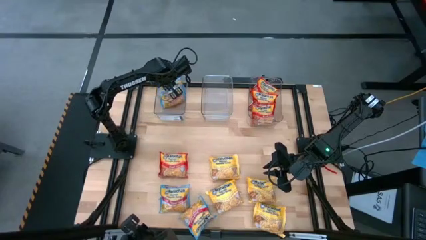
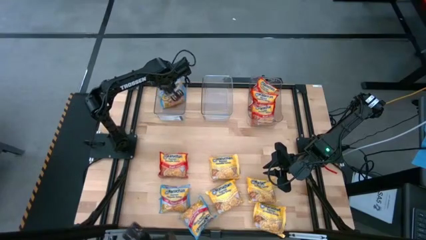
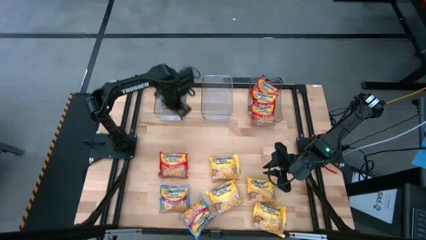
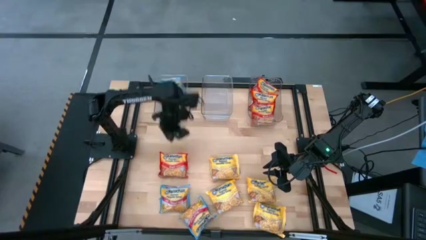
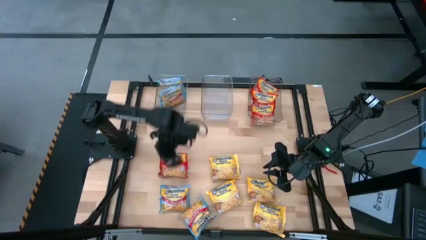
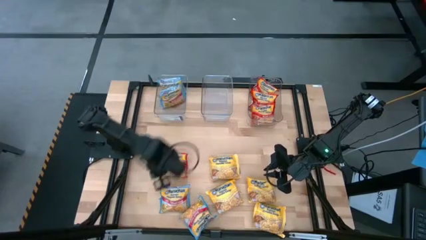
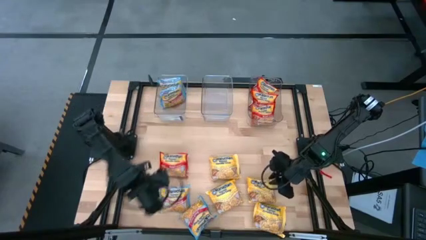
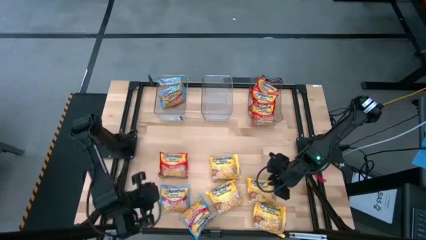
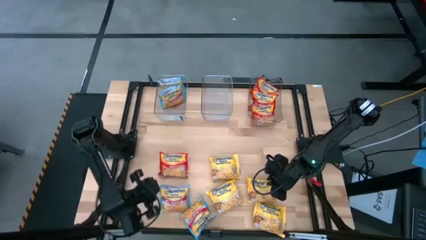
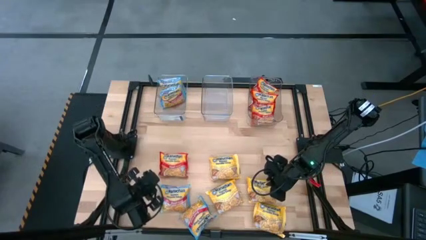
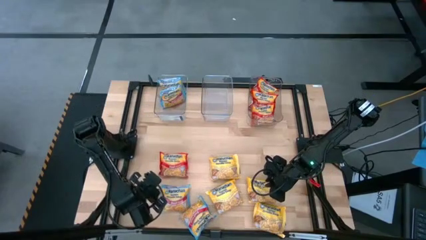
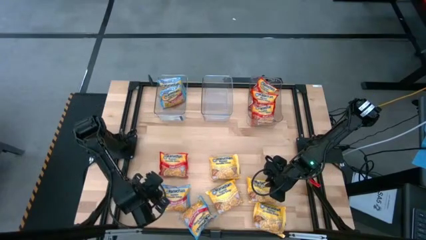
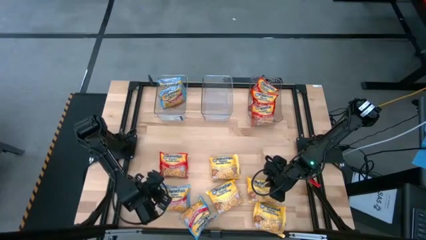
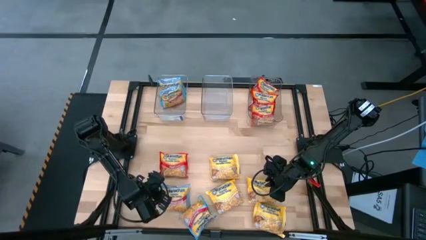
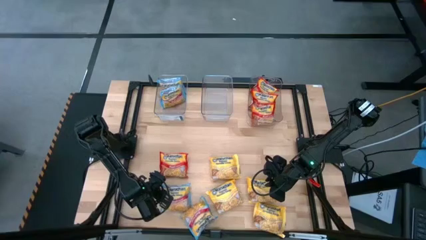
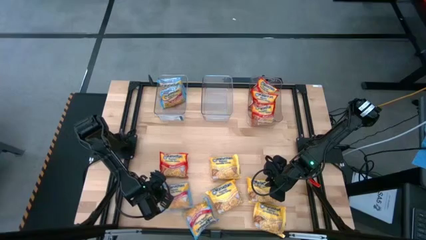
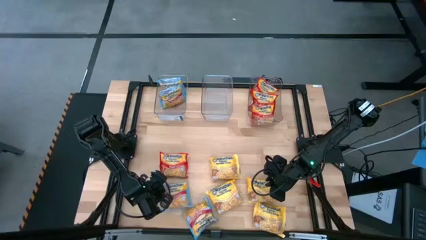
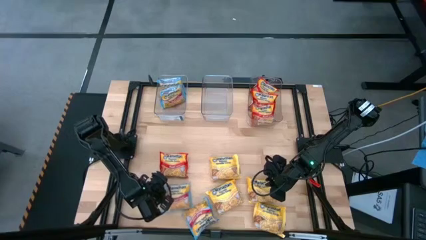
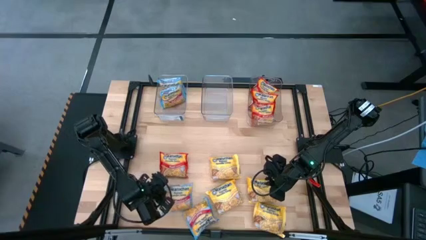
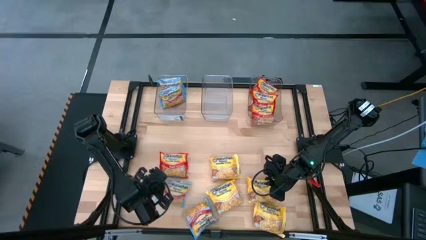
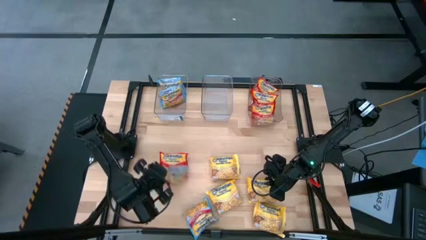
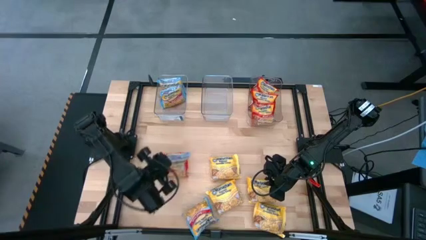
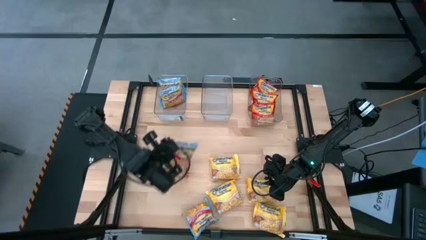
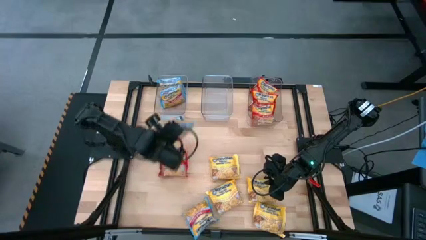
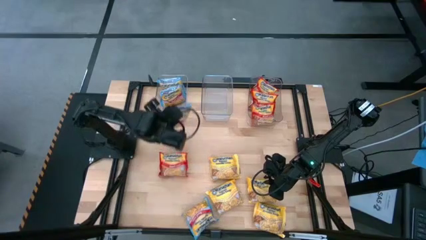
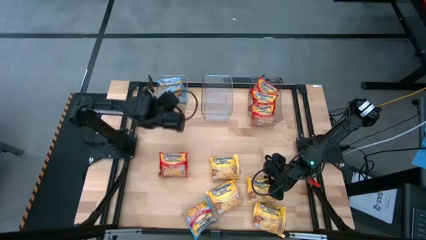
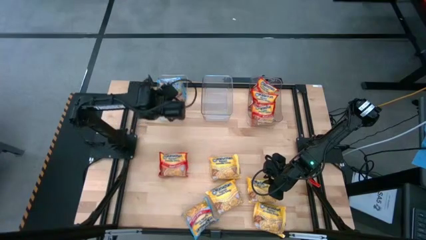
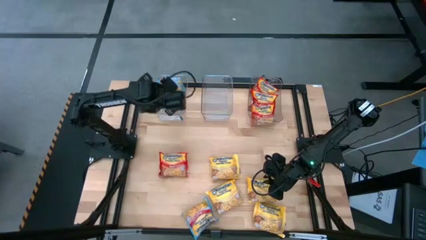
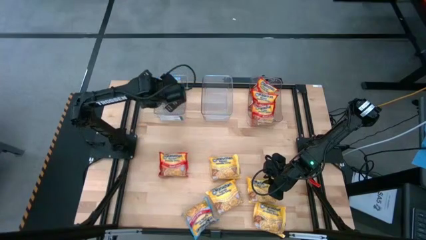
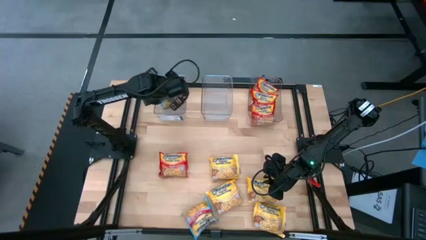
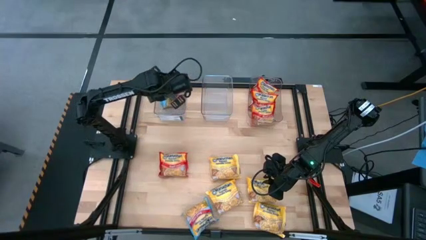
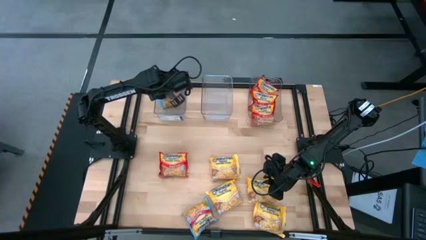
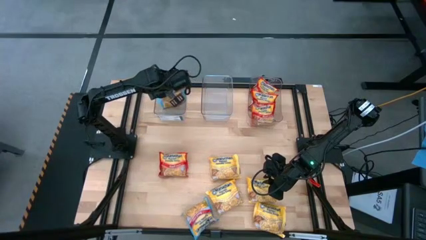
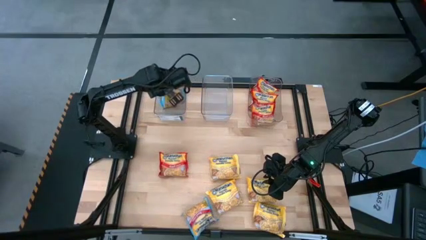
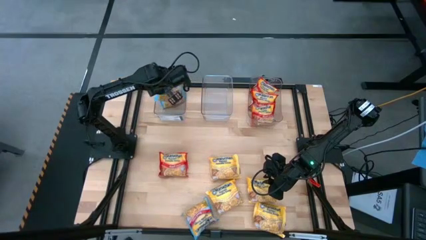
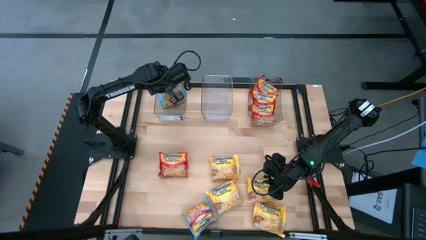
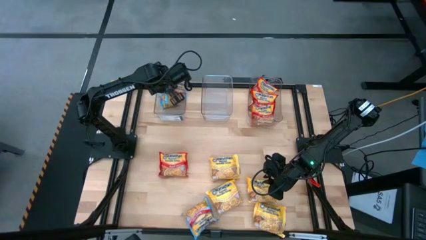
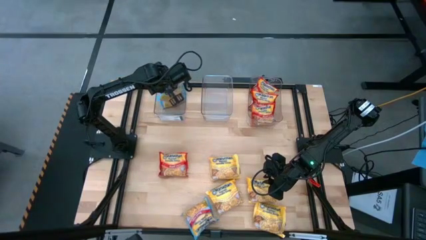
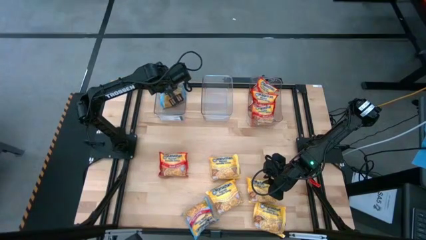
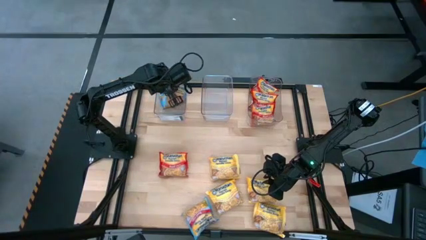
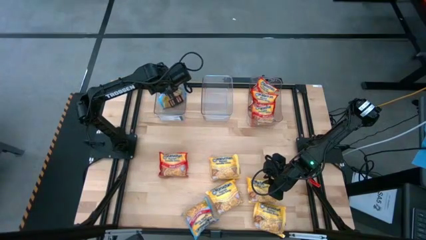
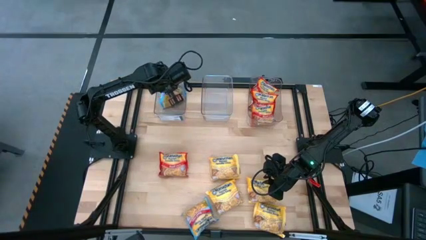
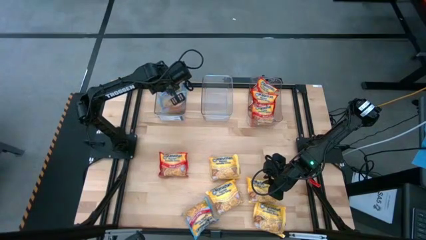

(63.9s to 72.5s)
Task: Sort Maruchan noodles
Put the blue noodle pack into the left transparent bin

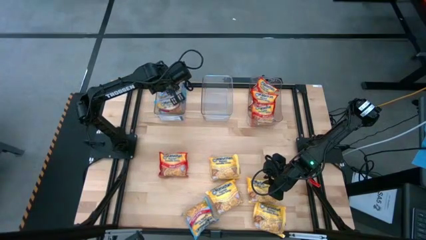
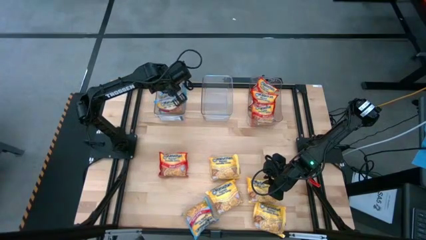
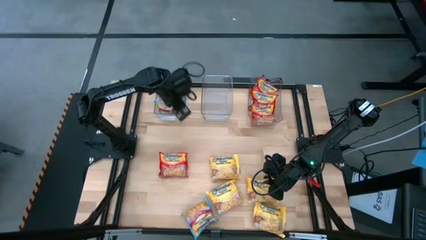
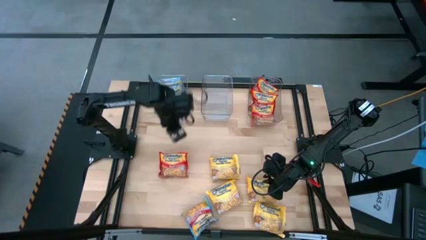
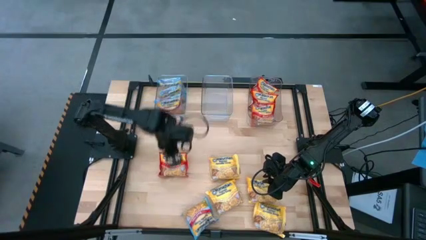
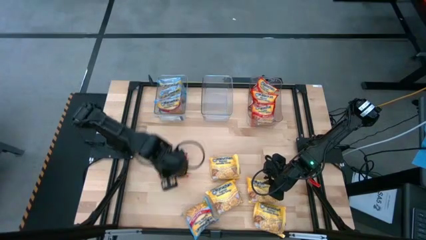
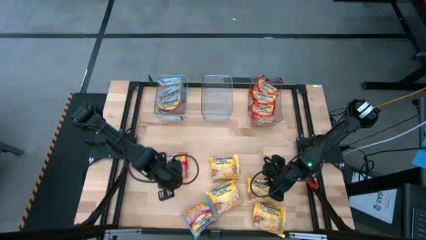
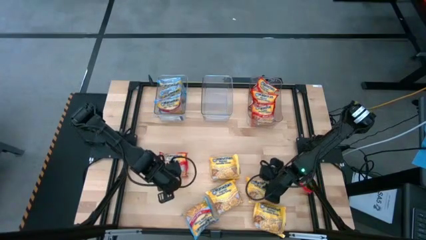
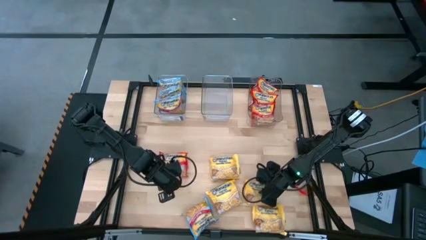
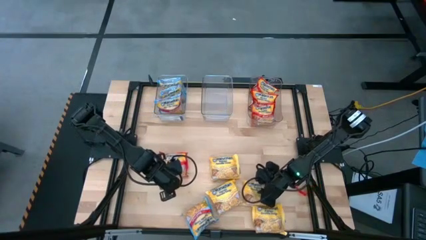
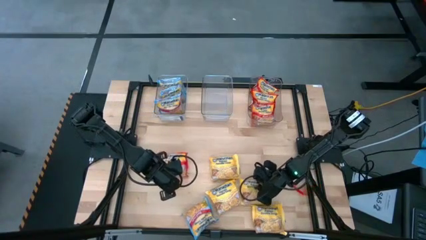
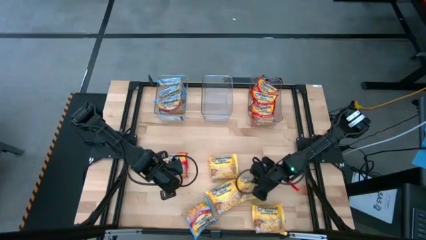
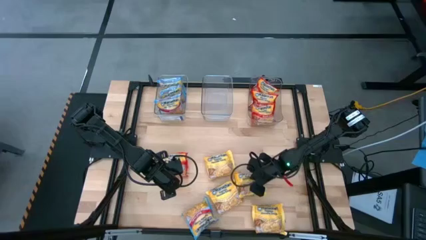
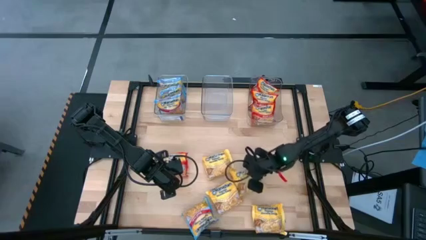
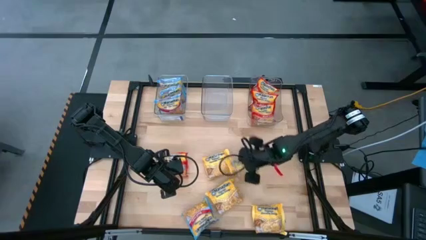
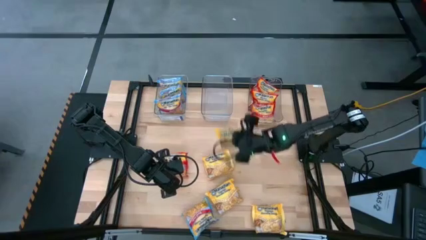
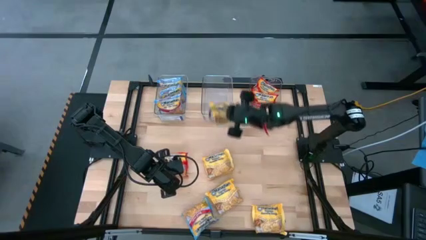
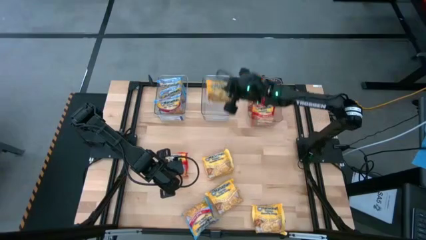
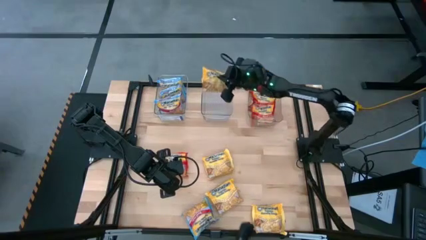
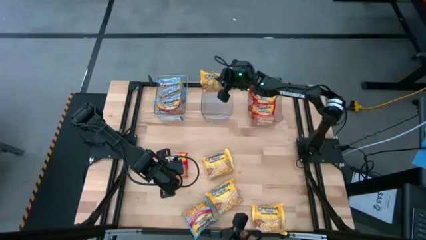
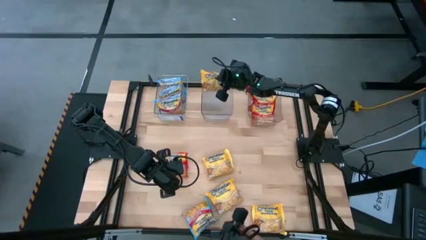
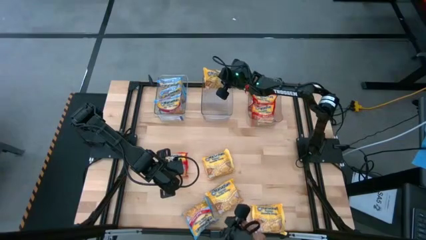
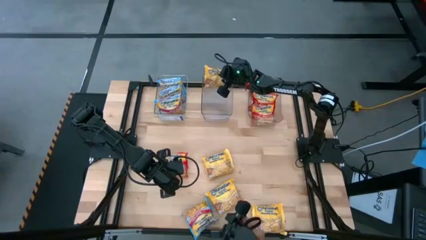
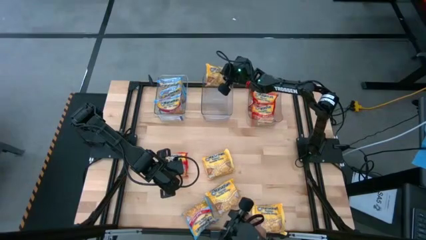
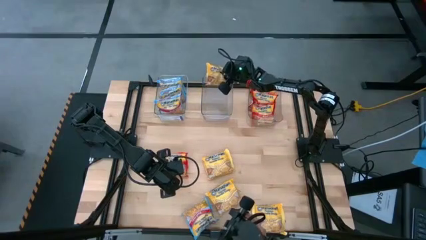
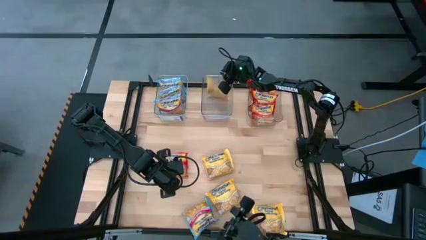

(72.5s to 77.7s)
Put the yellow noodle pack into the middle transparent bin

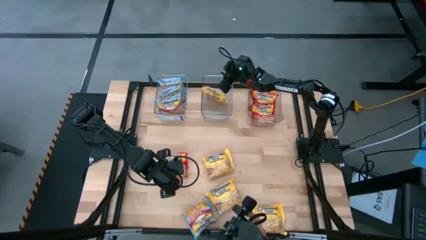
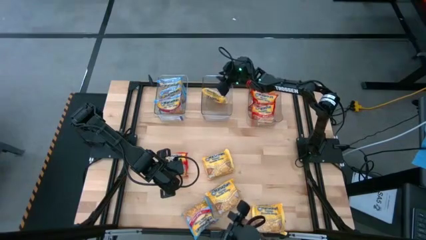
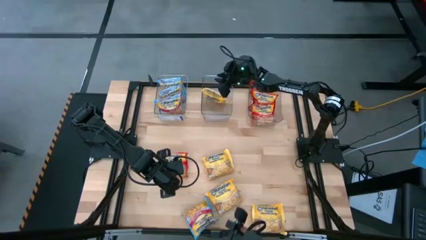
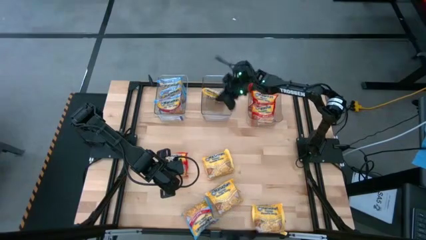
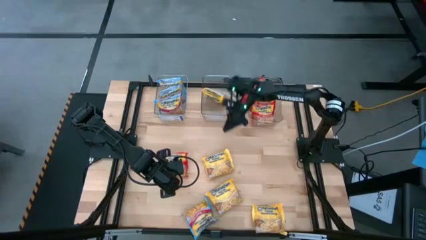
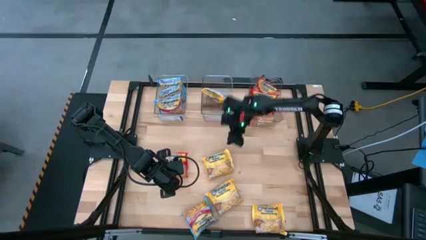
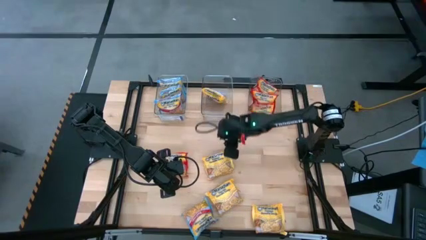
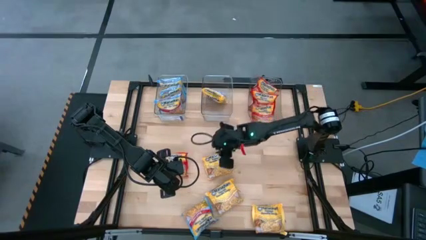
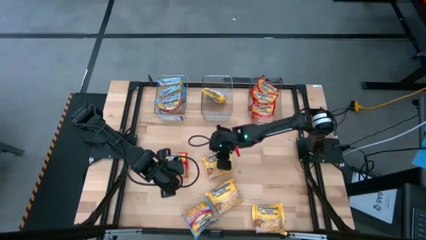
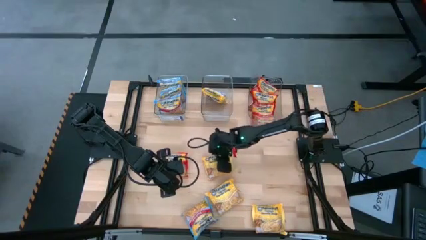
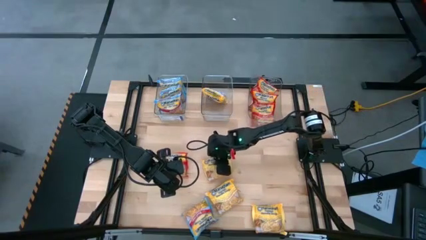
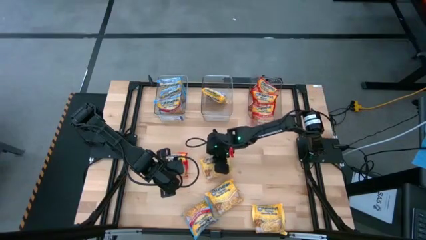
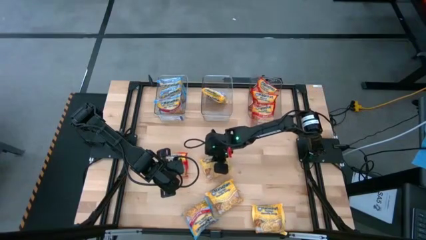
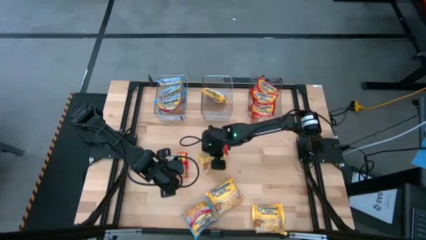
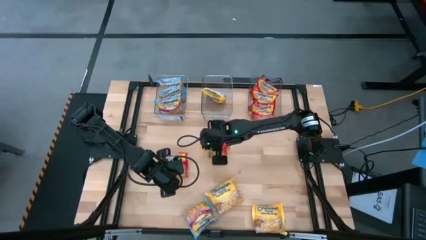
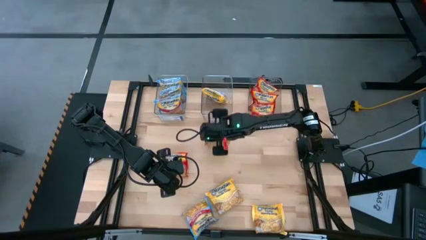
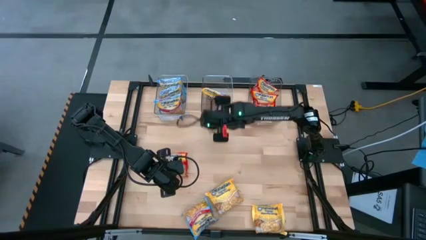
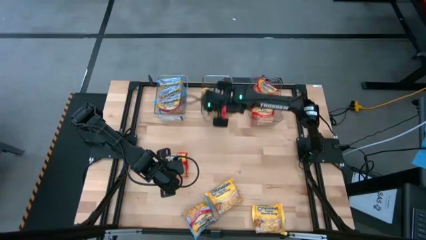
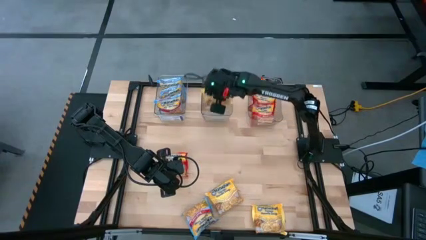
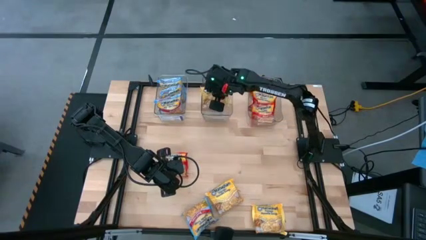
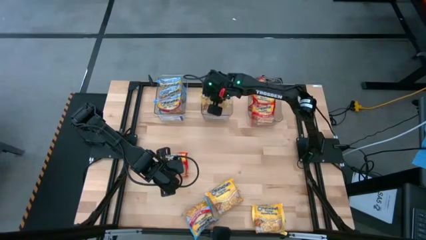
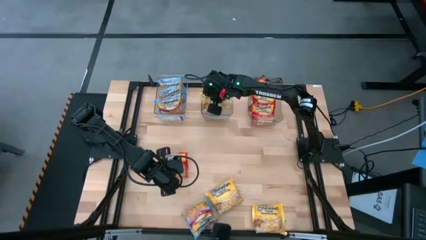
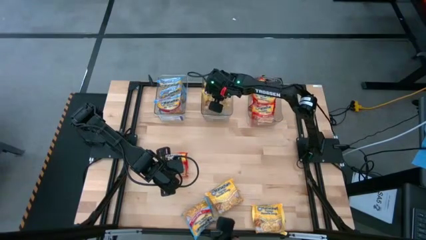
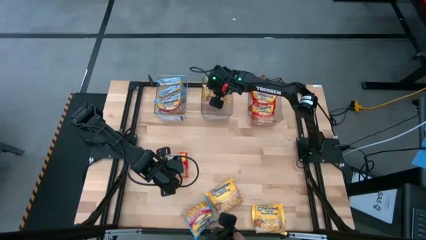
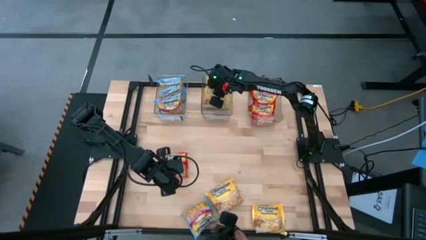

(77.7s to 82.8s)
Put the yellow noodle pack into the middle transparent bin
